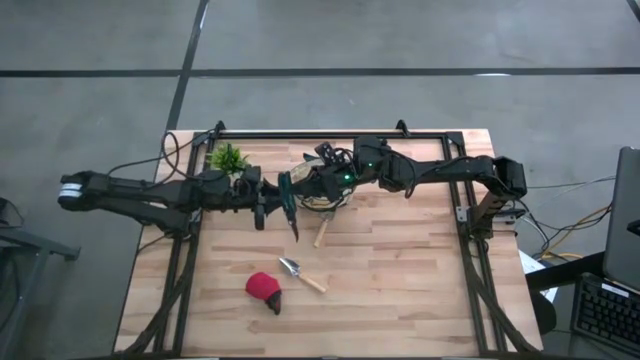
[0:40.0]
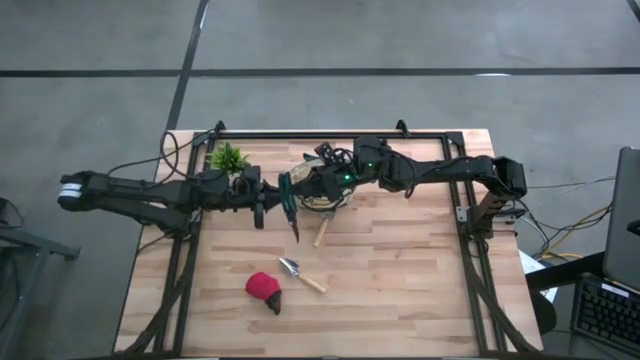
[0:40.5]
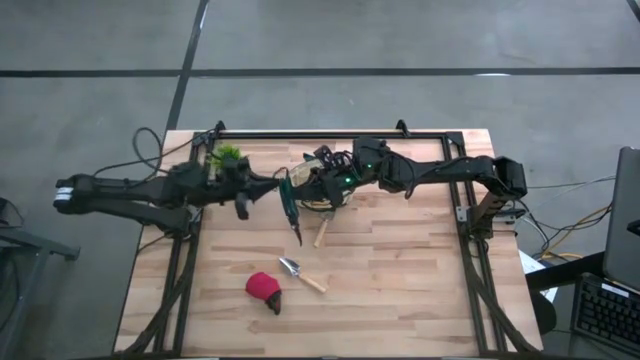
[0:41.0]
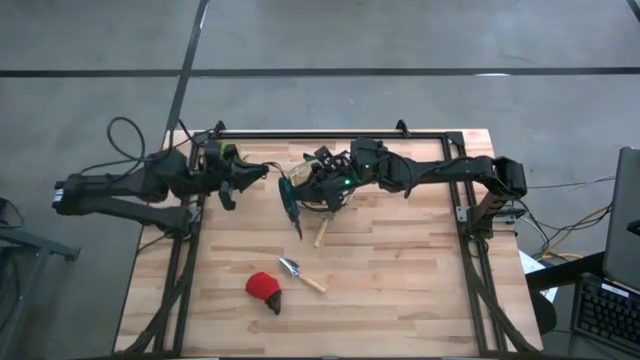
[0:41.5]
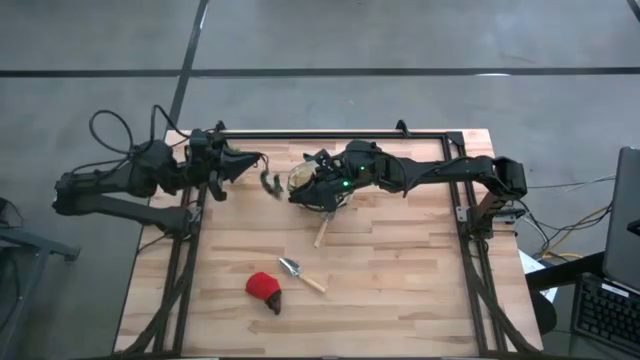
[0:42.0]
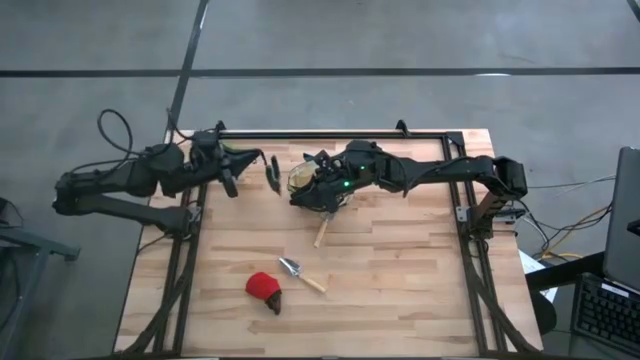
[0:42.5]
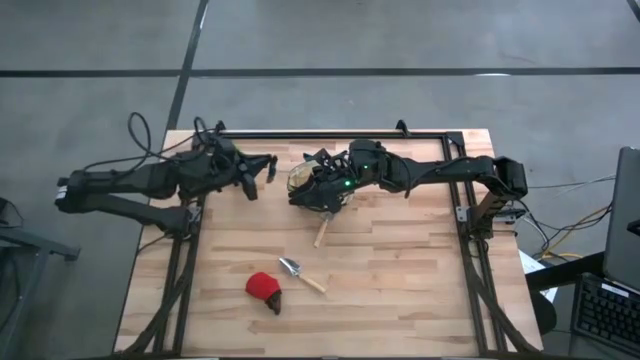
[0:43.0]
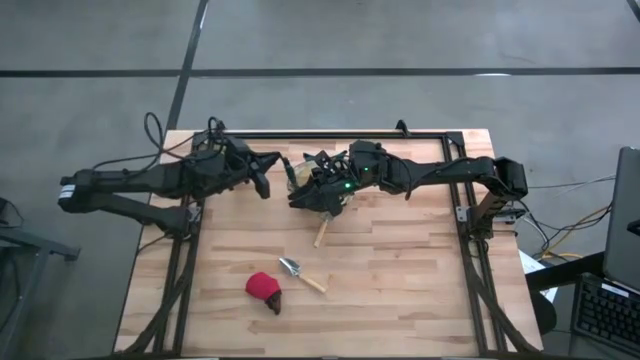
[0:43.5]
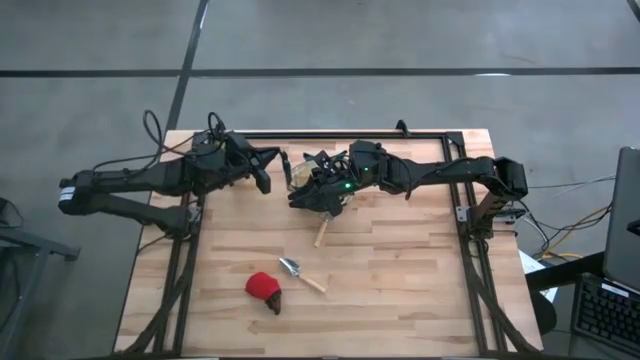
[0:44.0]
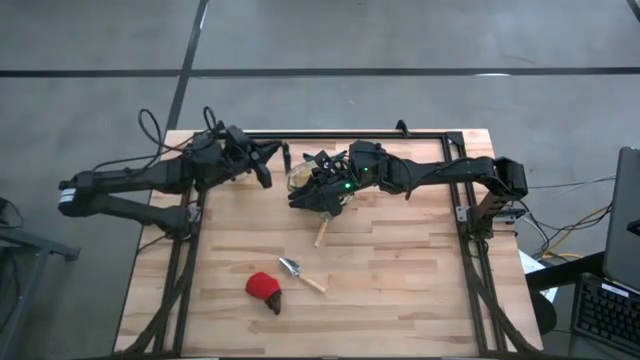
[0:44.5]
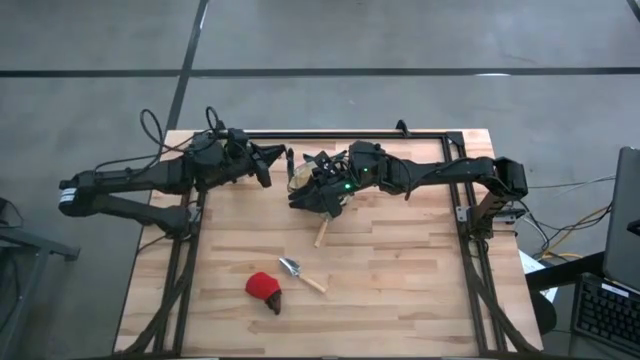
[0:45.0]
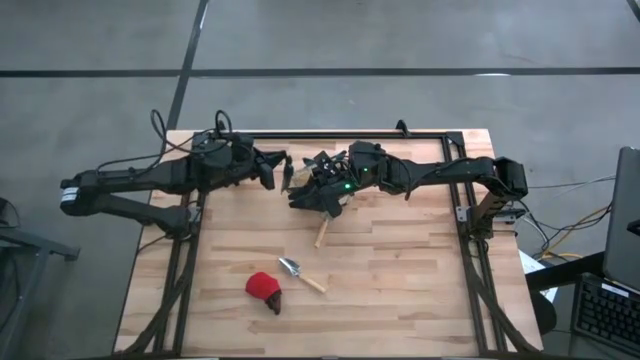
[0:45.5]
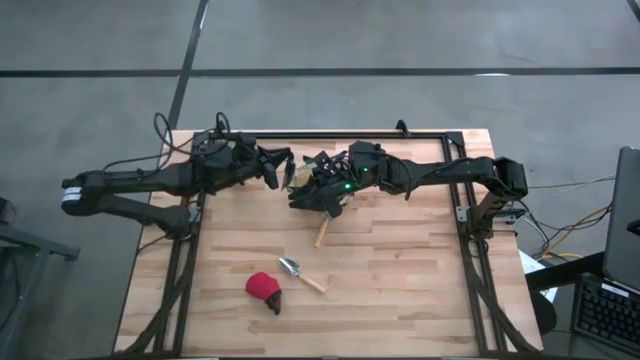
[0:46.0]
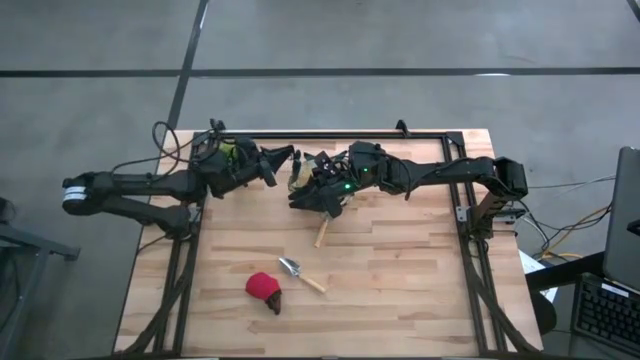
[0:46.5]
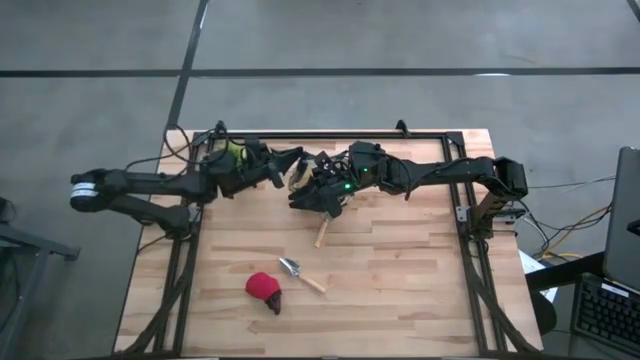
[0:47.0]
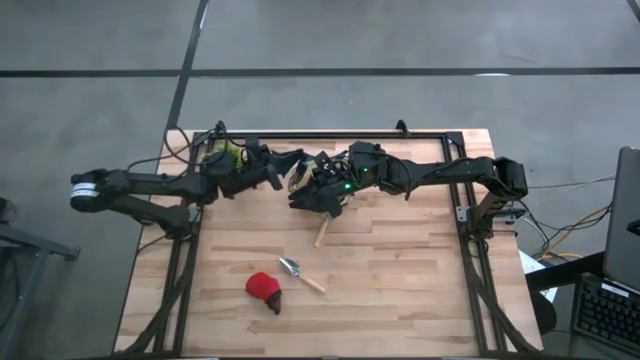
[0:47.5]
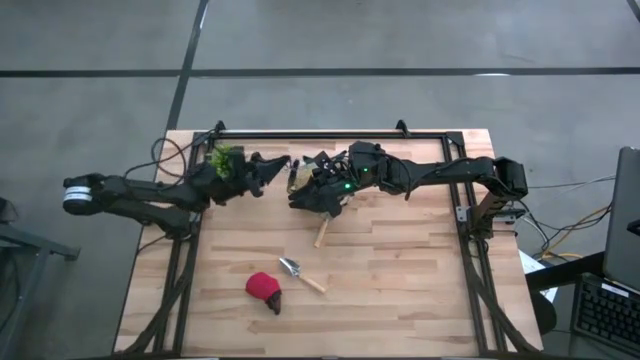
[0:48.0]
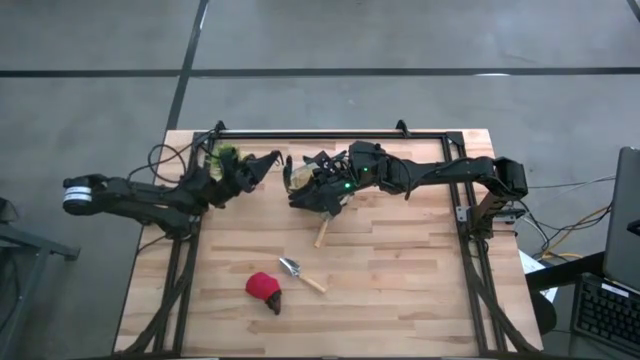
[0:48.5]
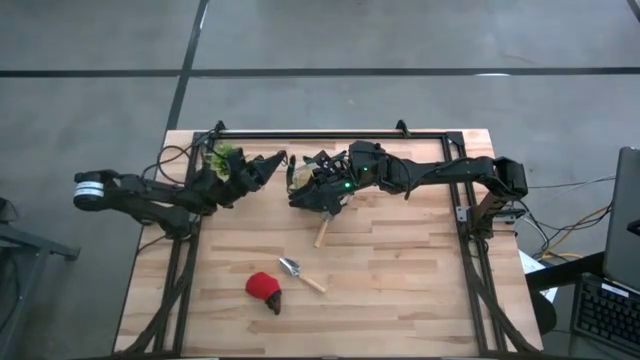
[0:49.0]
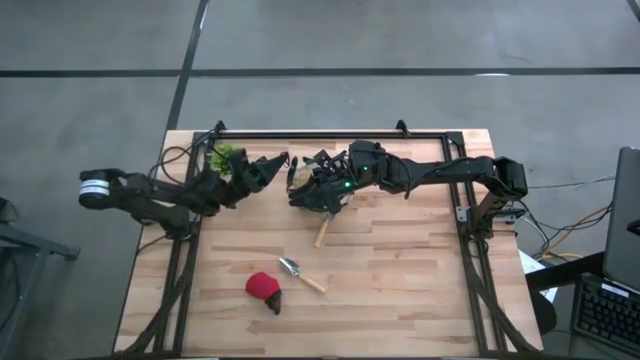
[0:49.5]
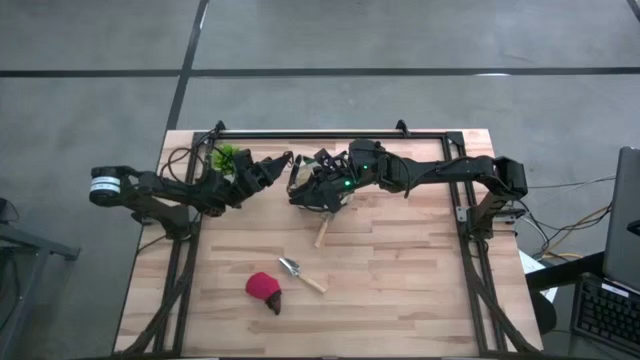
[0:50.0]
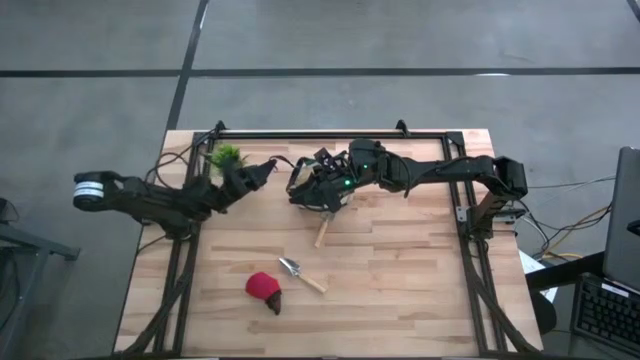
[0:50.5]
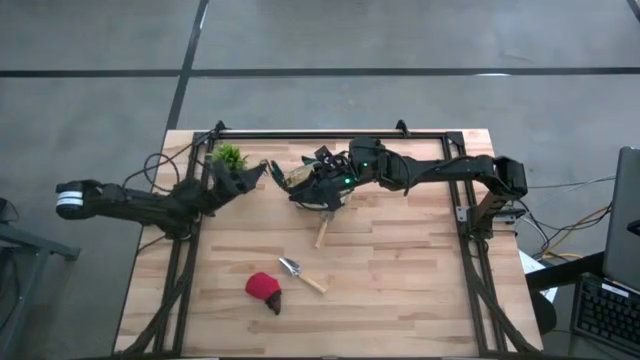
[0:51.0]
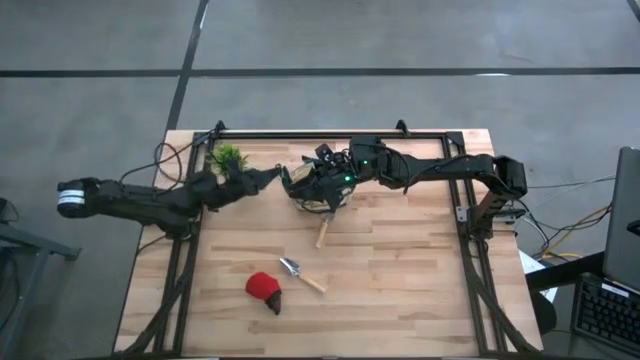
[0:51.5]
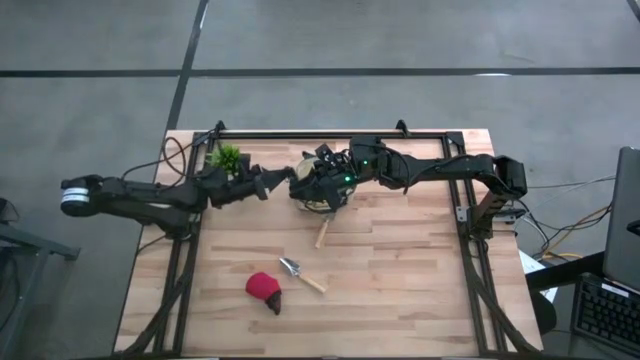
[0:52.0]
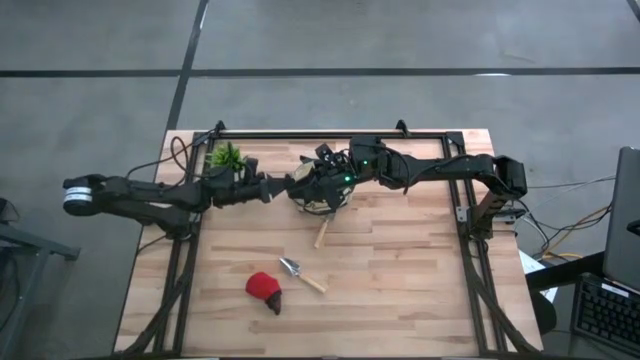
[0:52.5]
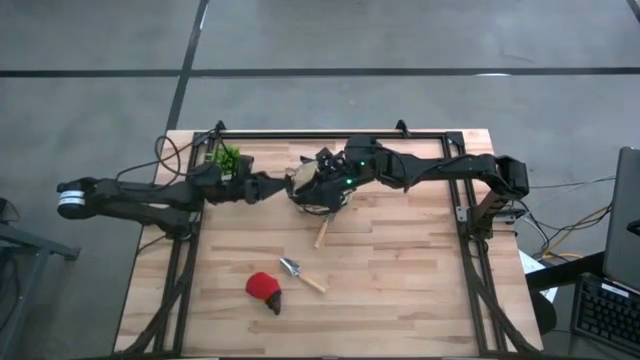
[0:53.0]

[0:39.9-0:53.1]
Task: Pick & Place Garden tools in Gardening bag
Put the green shear scissors into the brown gardening bag

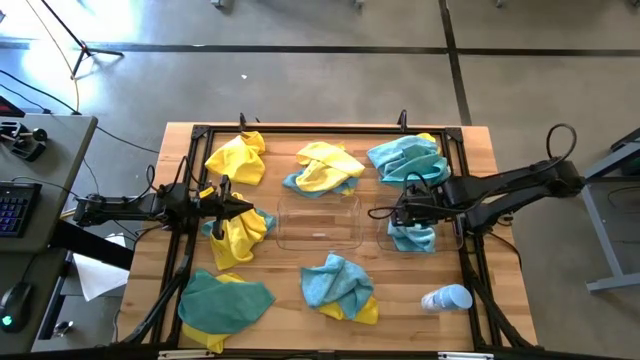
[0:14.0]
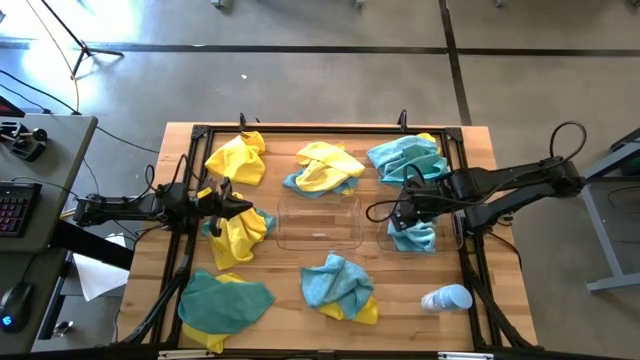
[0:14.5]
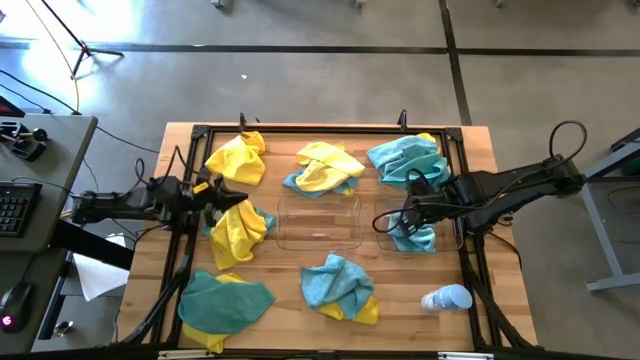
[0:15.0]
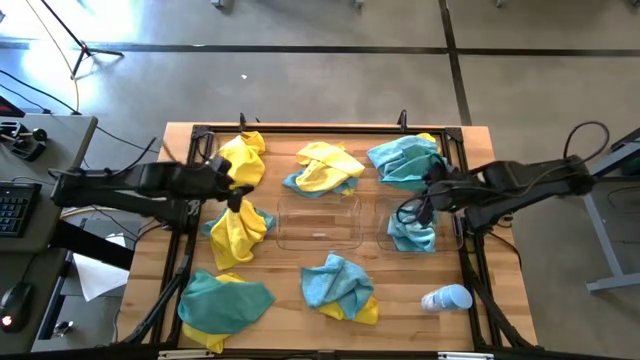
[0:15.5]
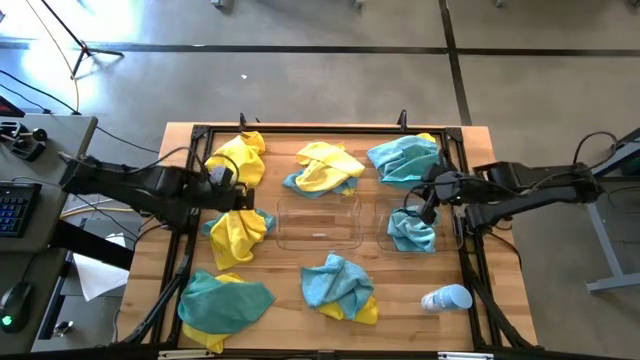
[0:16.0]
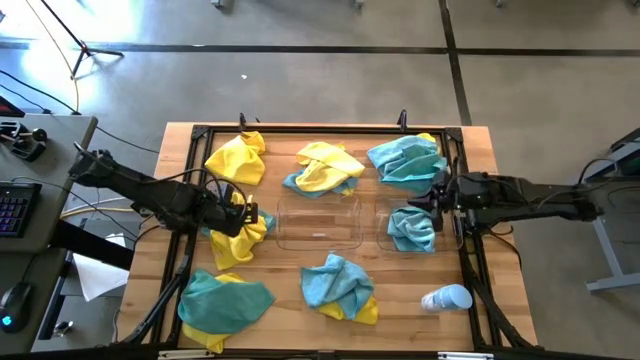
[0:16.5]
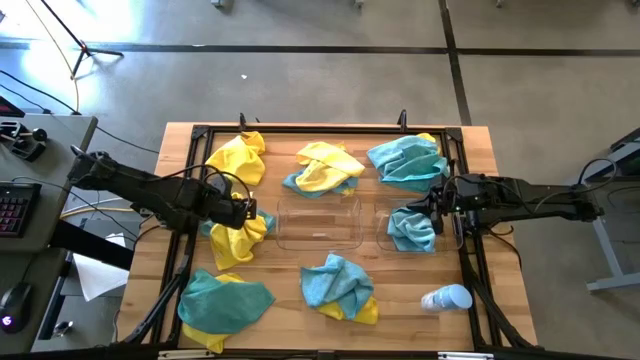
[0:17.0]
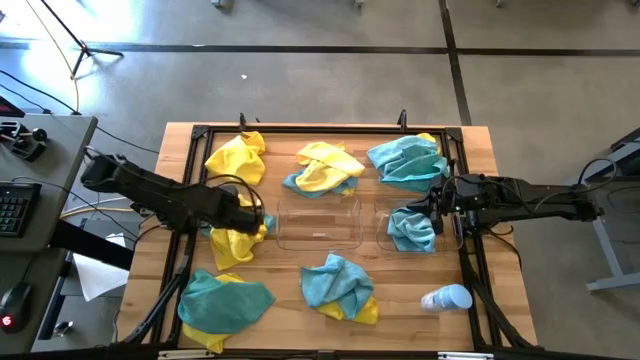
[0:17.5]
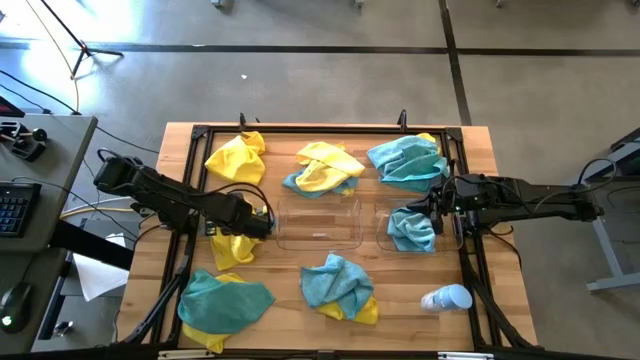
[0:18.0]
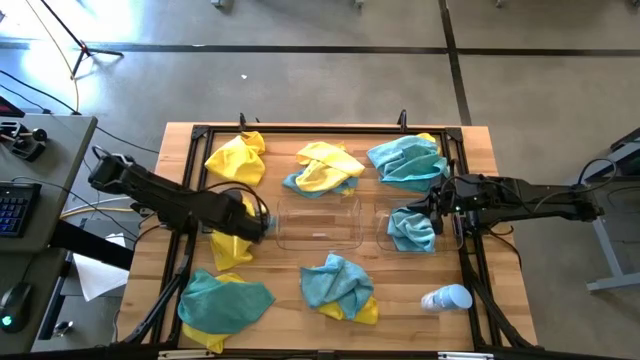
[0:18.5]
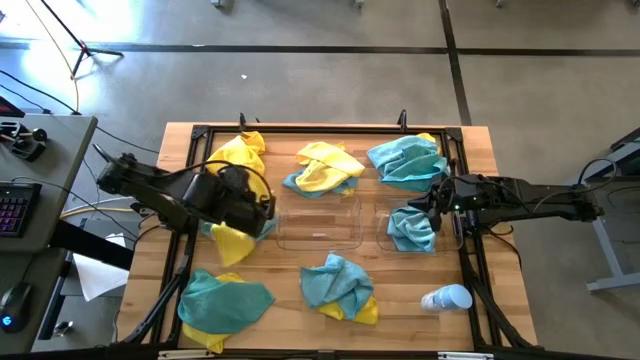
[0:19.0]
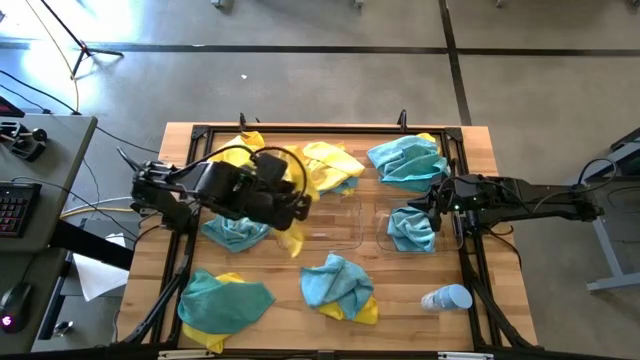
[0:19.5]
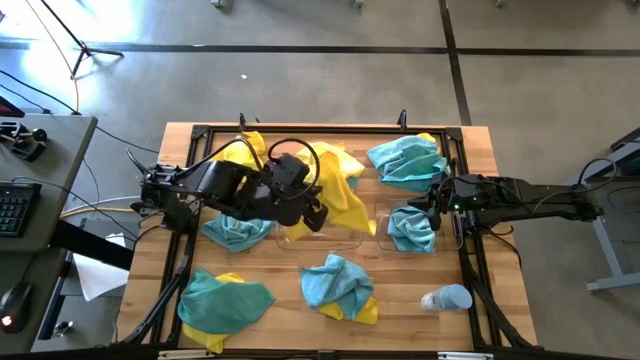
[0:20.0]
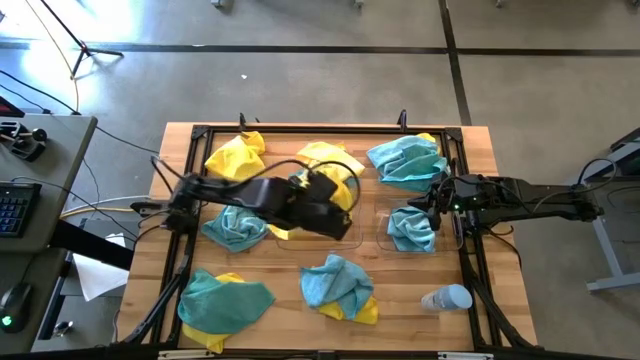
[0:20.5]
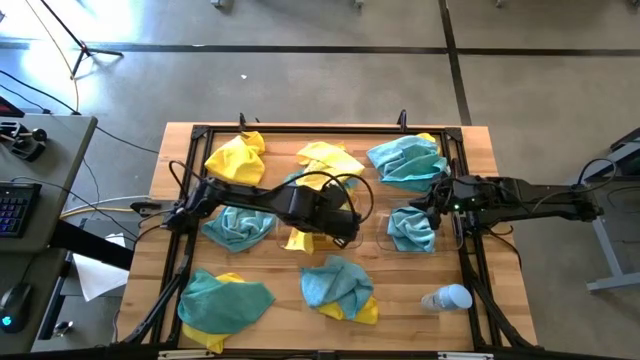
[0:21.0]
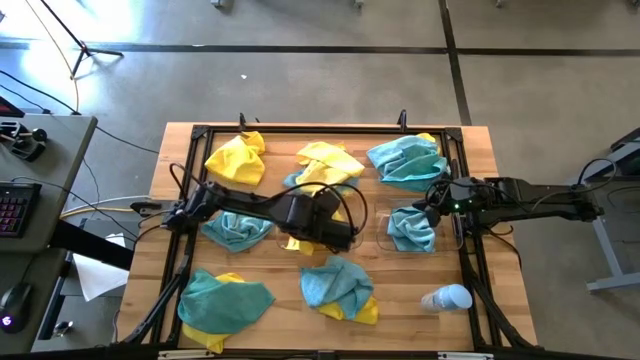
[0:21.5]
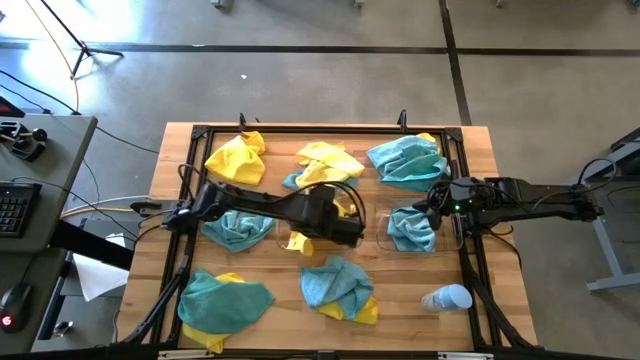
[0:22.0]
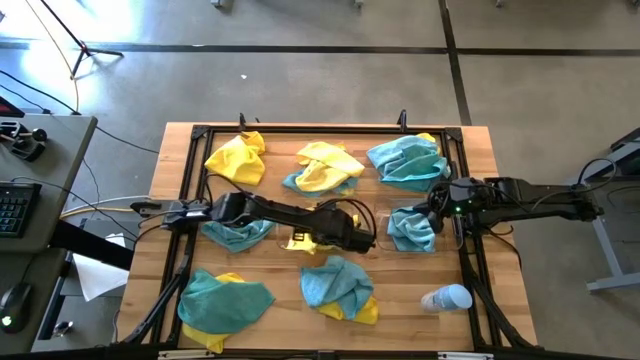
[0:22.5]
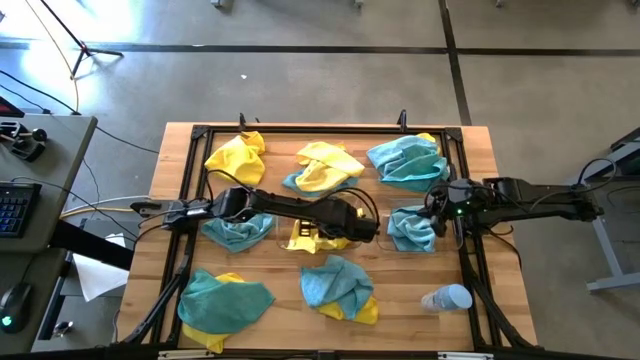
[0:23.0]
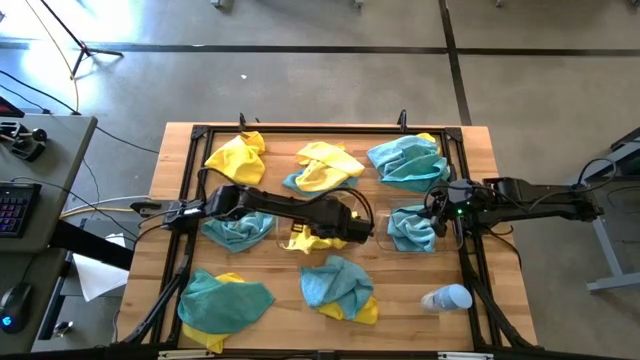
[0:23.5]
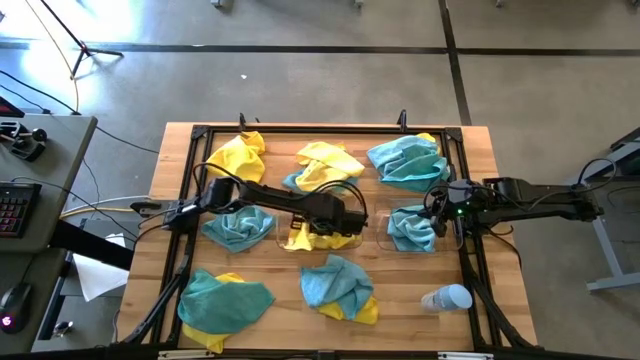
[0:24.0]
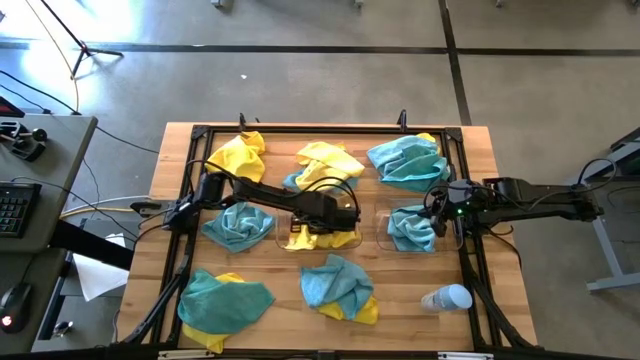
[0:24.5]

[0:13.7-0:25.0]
Task: Sort microfiber towel by color & place in baskets
Put the yellow microfiber cloth into the left transparent bin
